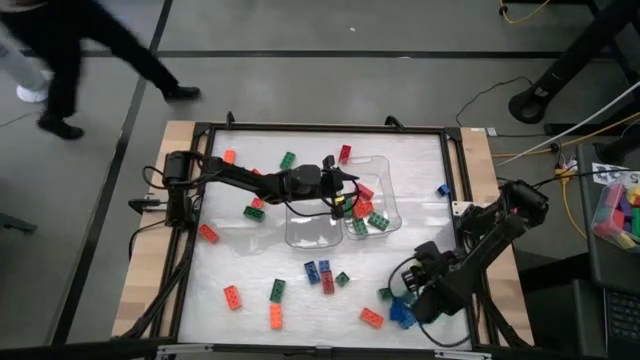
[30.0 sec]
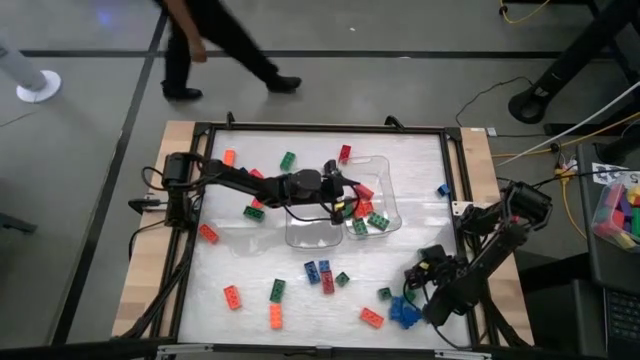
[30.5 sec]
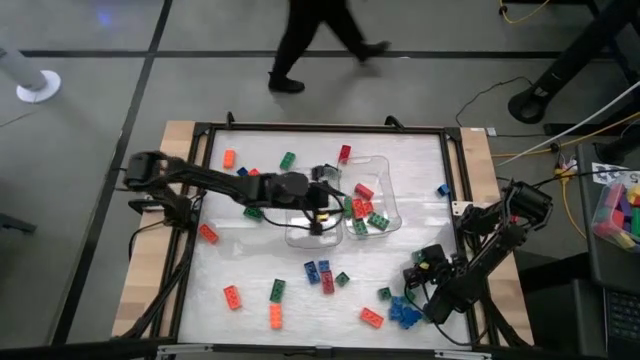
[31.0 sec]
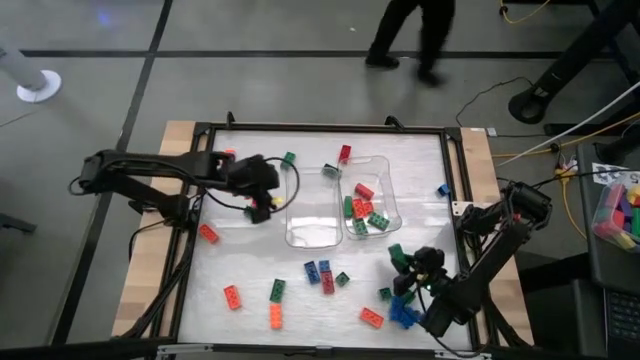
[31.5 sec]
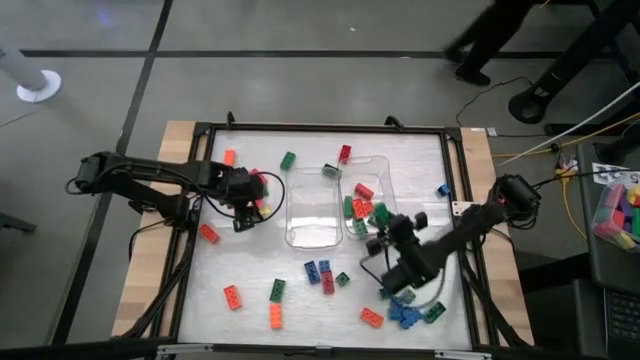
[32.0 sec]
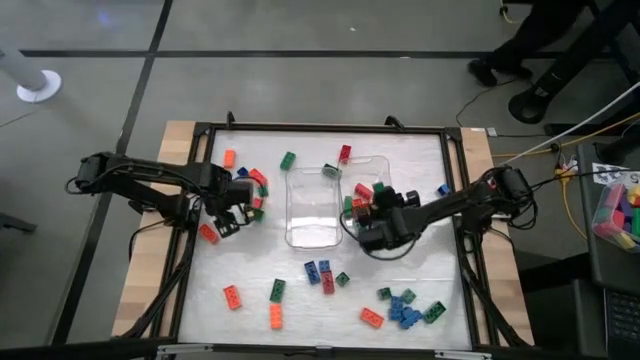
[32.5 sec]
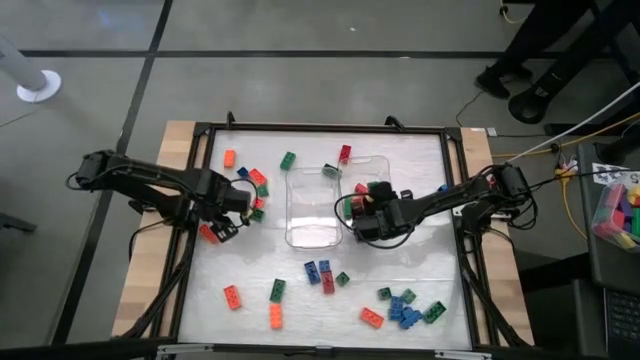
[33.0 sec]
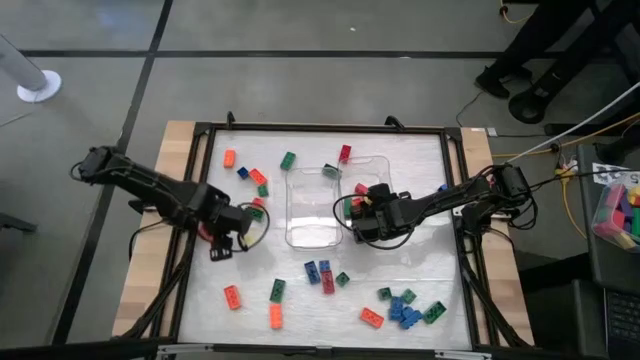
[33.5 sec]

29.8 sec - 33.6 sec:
Task: Sort blocks by size
Put the green rectangular game piece into the right transparent bin

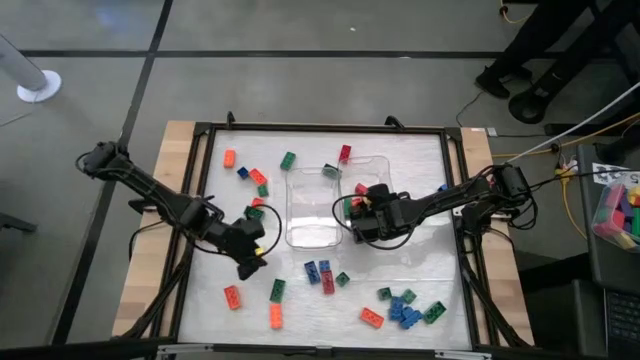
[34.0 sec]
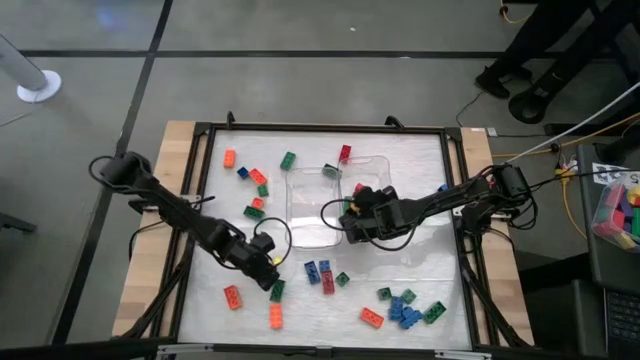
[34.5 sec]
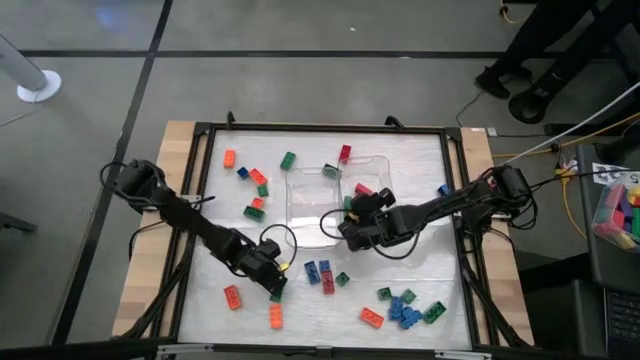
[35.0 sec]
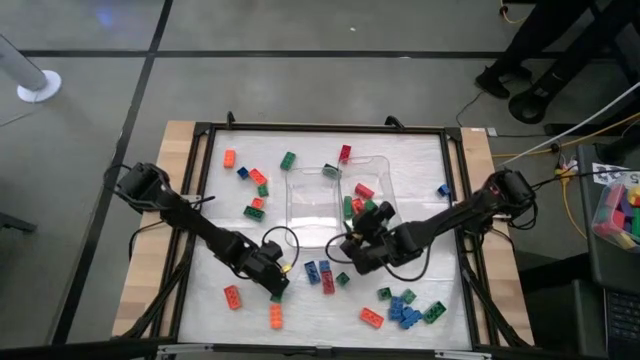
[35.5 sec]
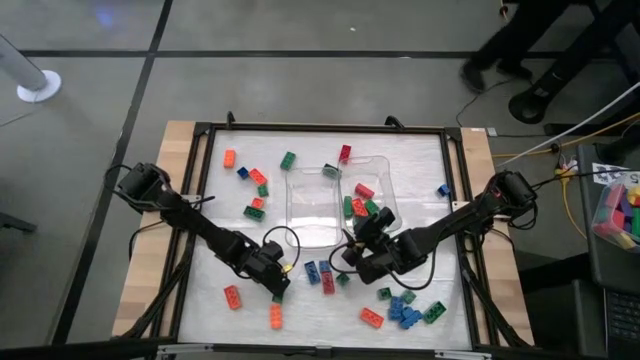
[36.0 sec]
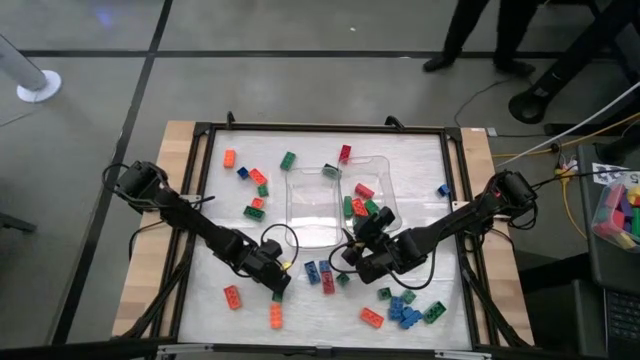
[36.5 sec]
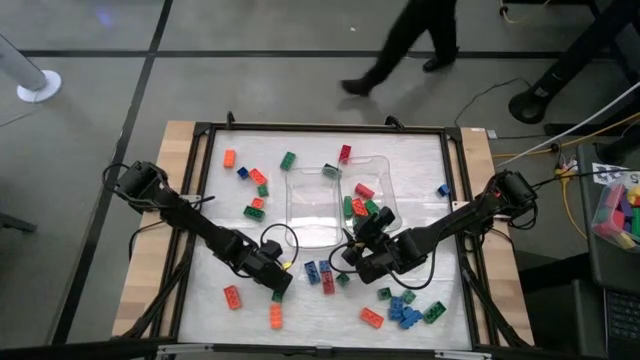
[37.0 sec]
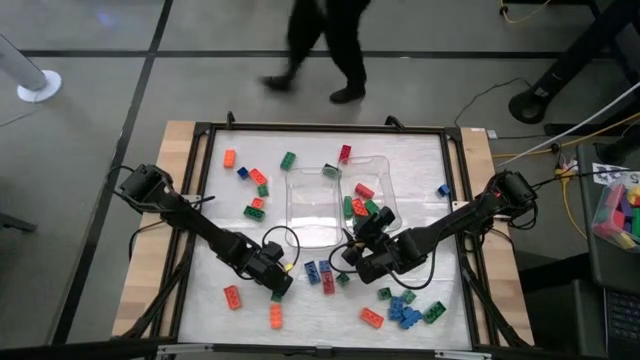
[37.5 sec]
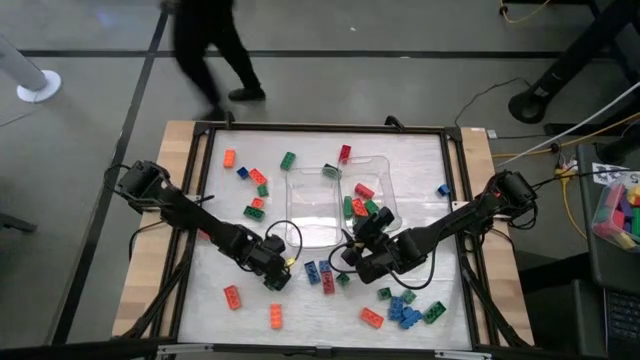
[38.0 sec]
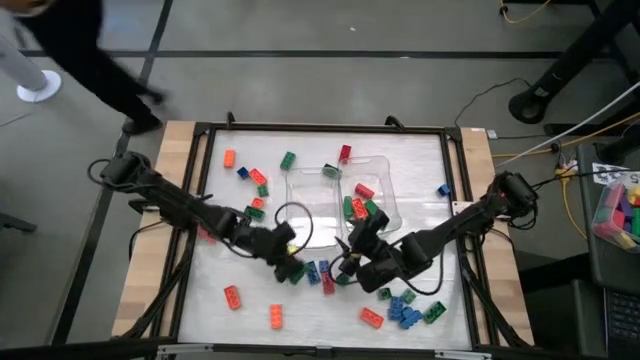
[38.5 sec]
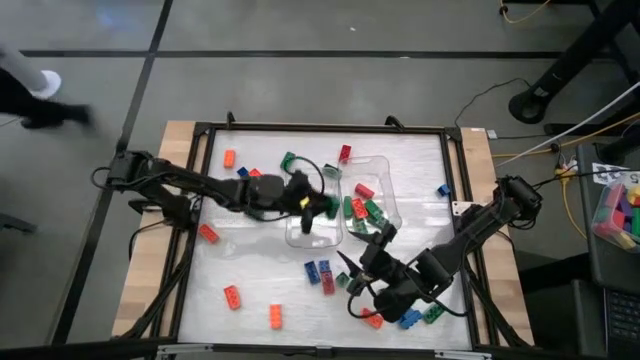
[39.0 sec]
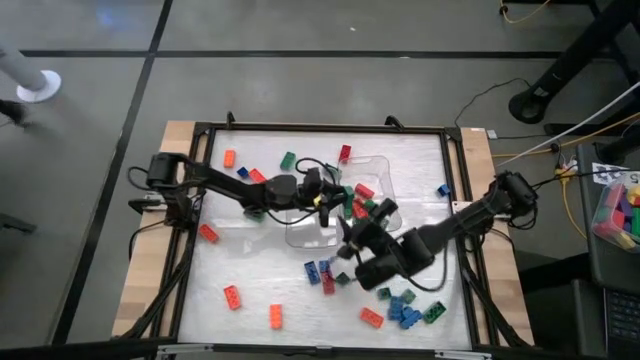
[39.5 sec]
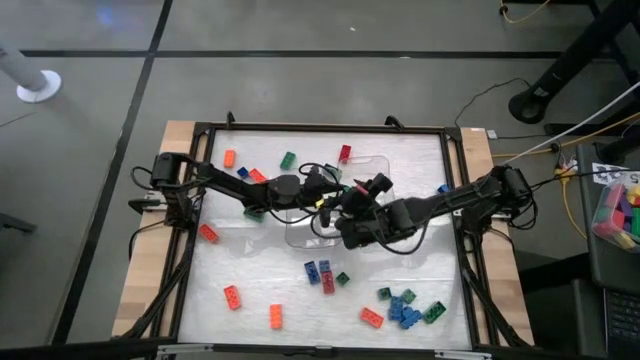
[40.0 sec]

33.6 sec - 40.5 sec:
Put the green rectangular game piece into the right transparent bin

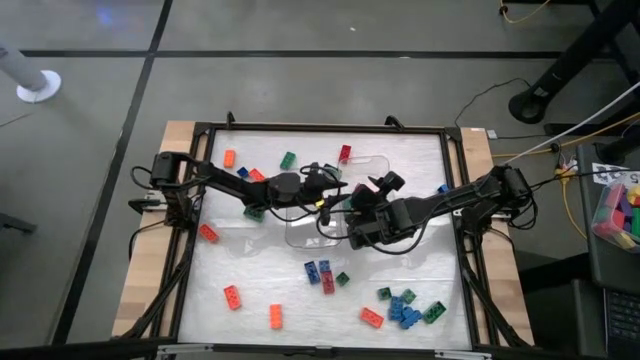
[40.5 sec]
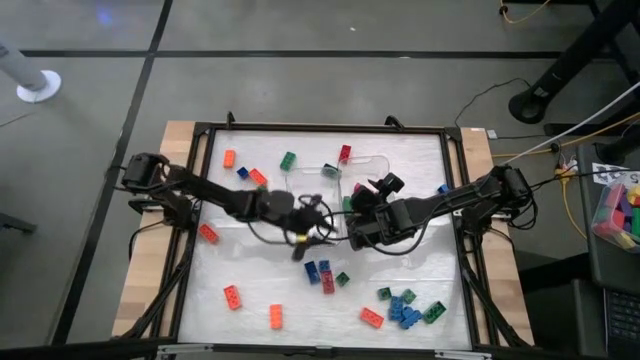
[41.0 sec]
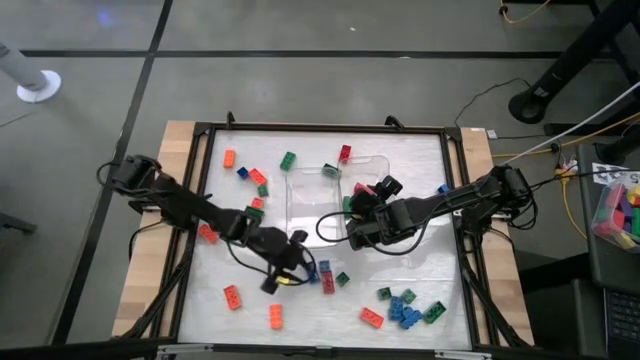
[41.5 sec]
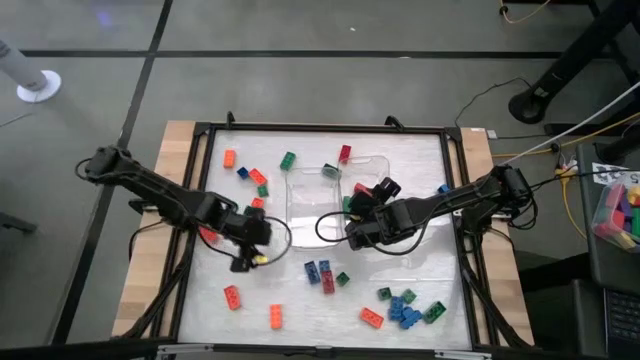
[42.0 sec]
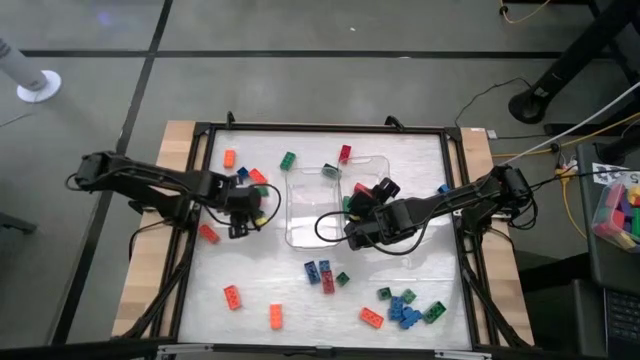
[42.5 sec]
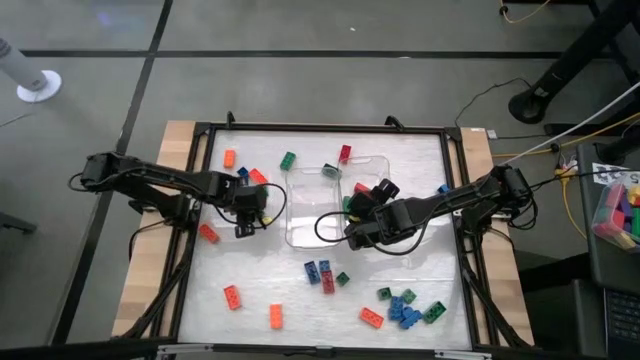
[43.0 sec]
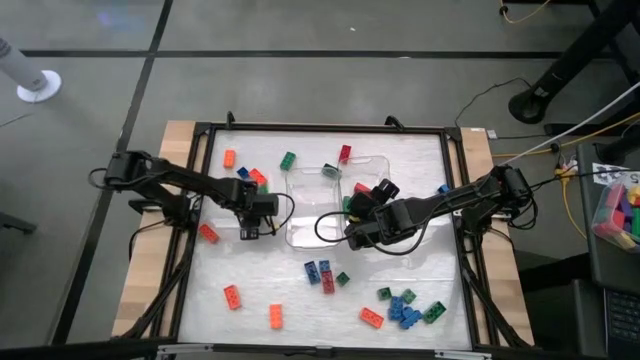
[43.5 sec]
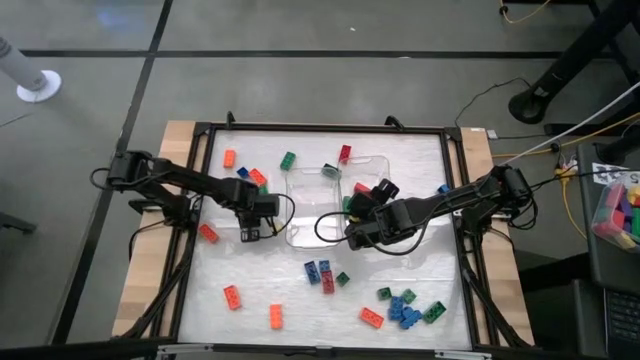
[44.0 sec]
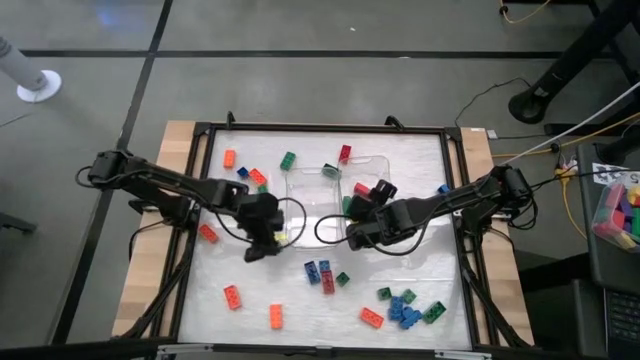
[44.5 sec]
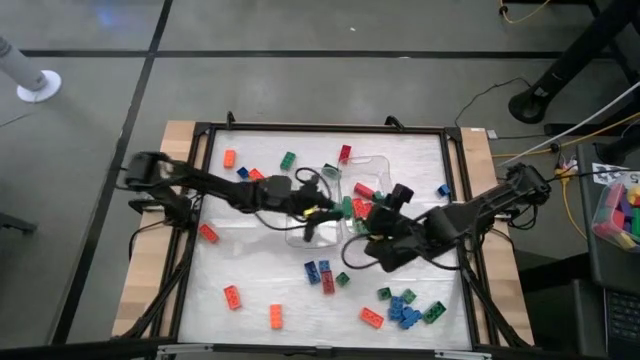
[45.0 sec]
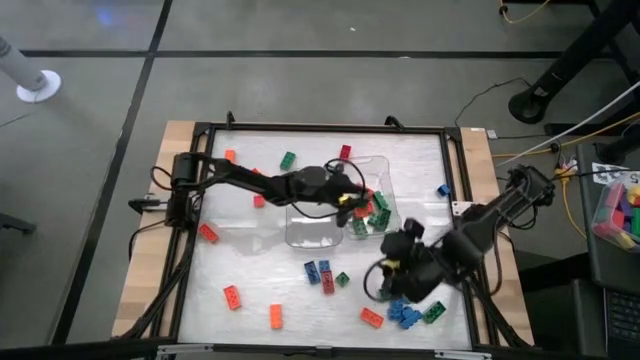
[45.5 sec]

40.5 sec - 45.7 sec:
Put the green rectangular game piece into the right transparent bin

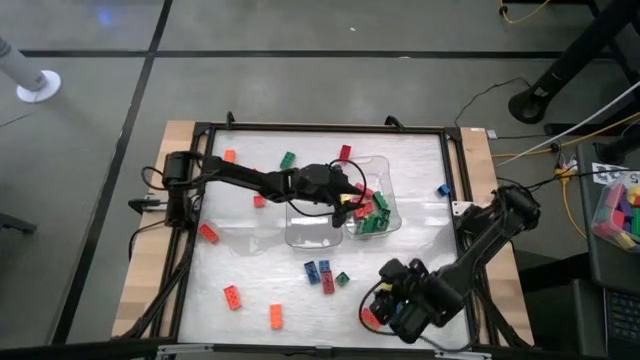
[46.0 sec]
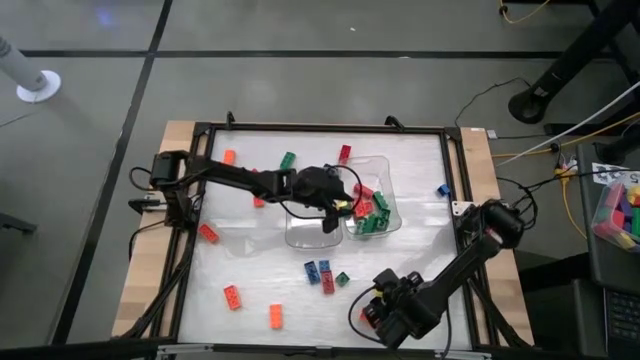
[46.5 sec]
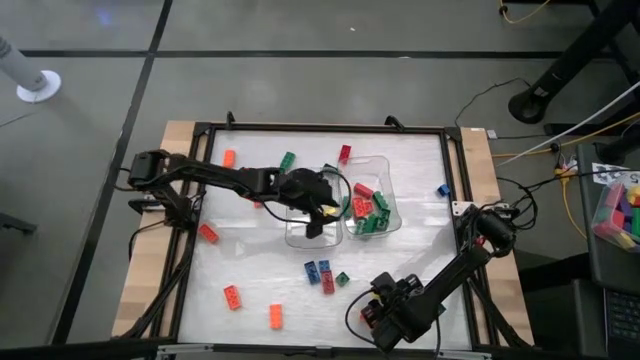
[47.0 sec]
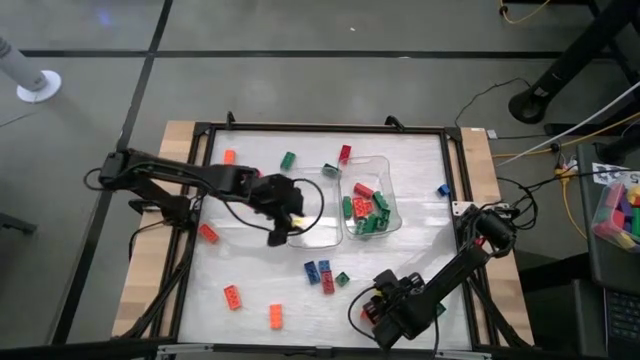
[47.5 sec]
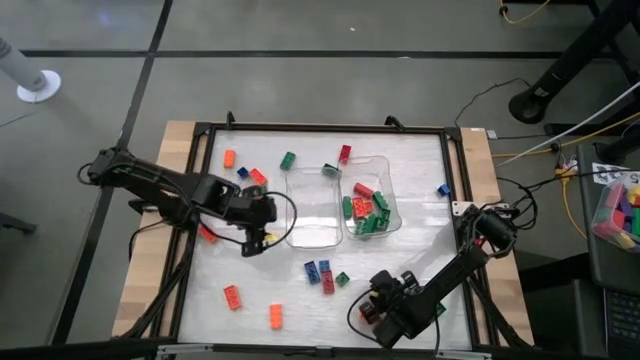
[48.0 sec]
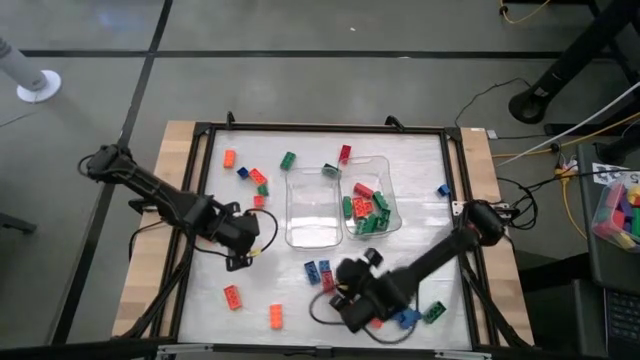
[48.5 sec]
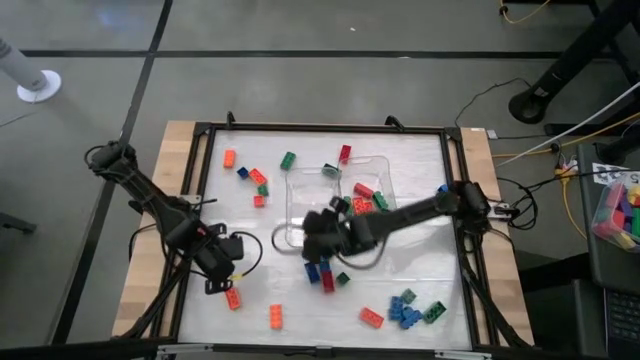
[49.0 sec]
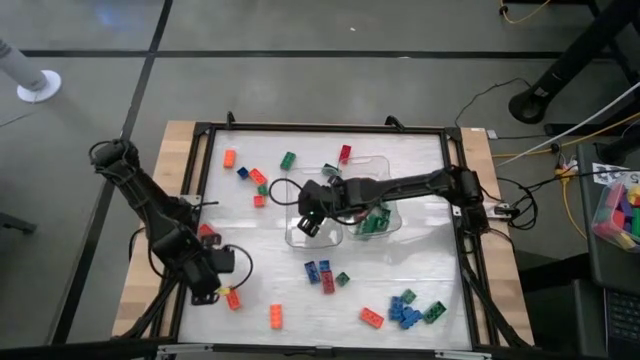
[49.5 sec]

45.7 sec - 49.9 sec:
Put the green square game piece into the left transparent bin

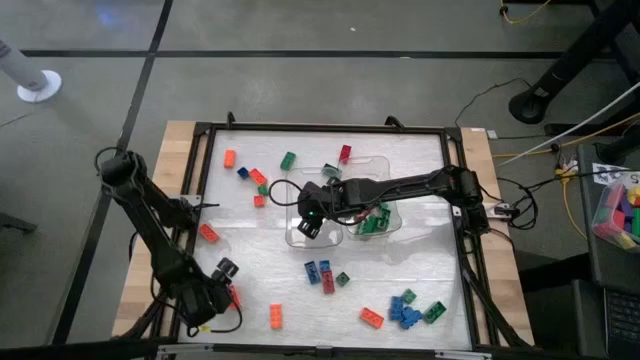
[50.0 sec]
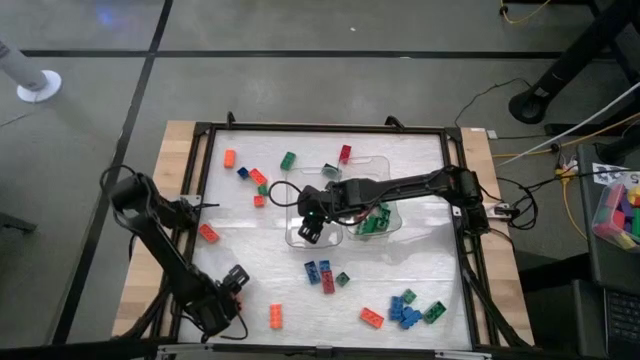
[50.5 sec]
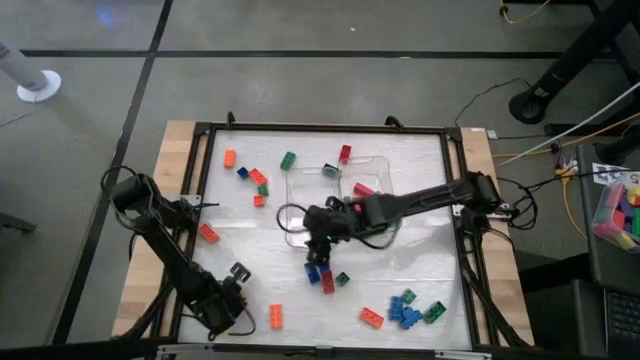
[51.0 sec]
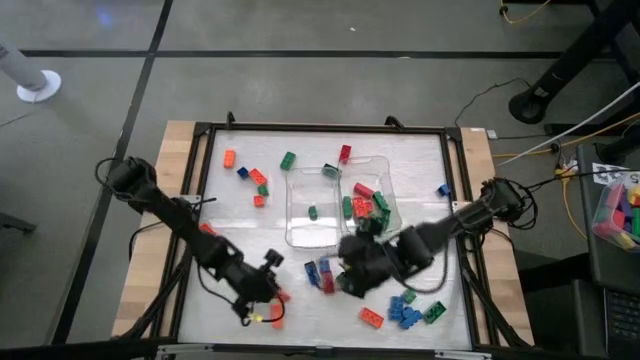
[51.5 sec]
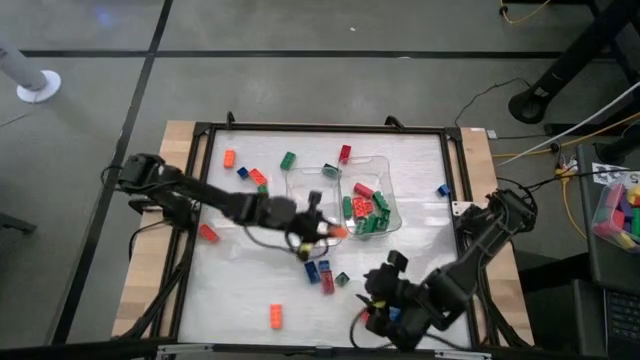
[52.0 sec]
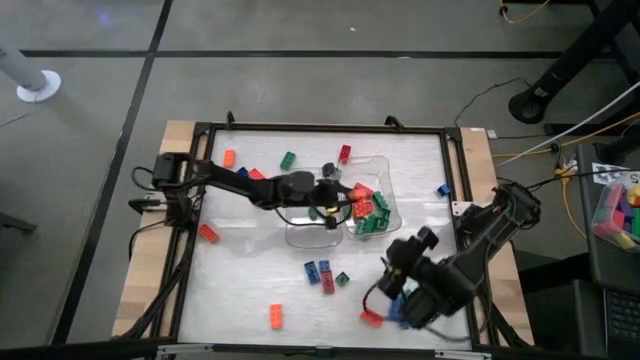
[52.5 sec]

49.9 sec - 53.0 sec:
Put the orange rectangular game piece into the right transparent bin
